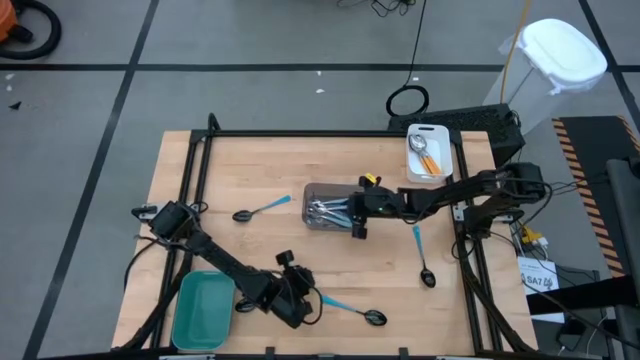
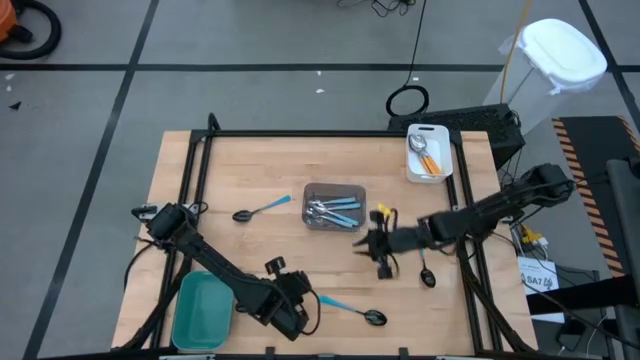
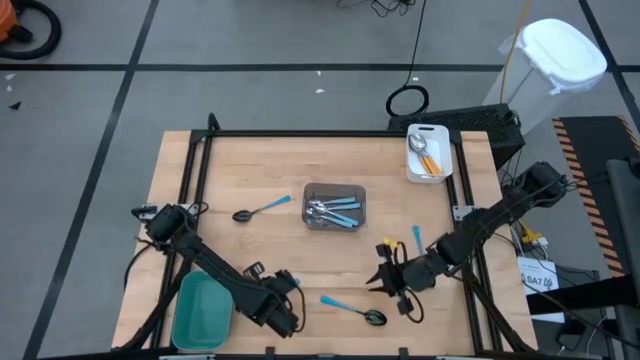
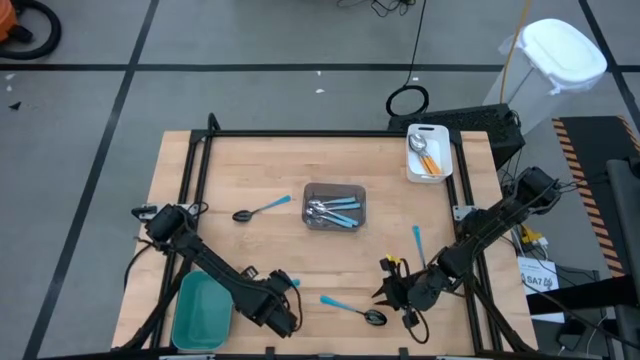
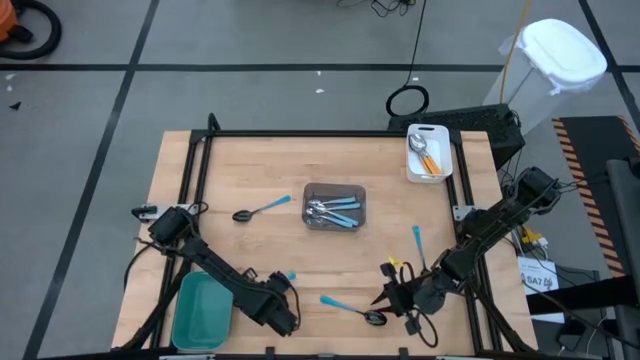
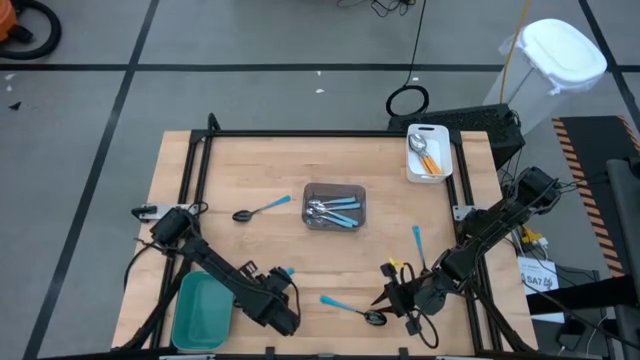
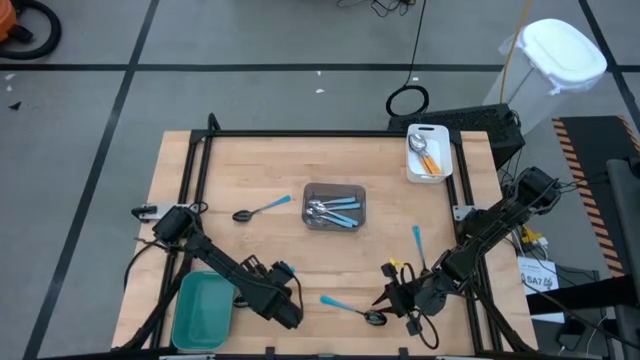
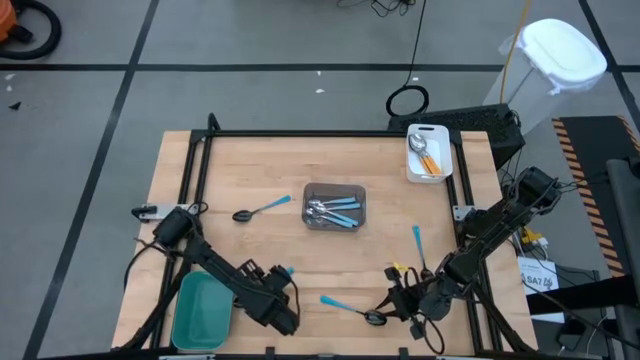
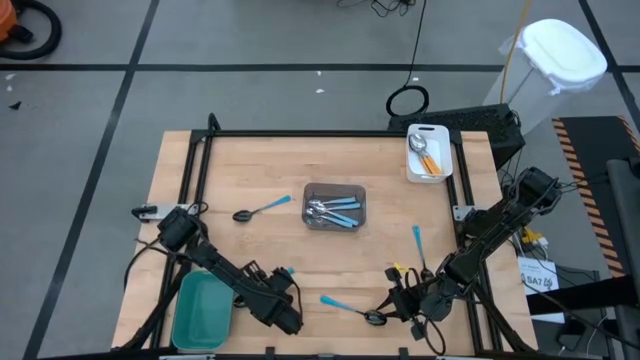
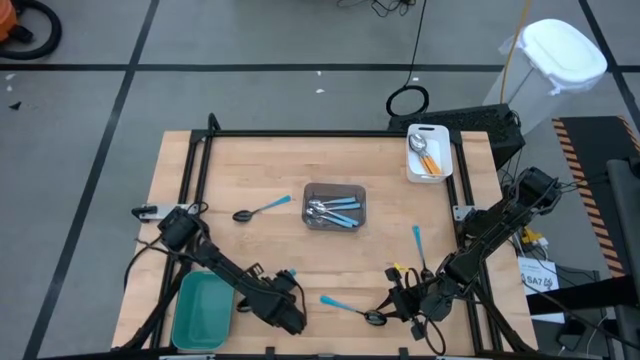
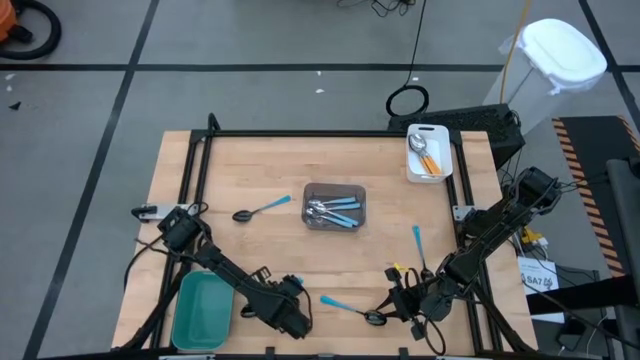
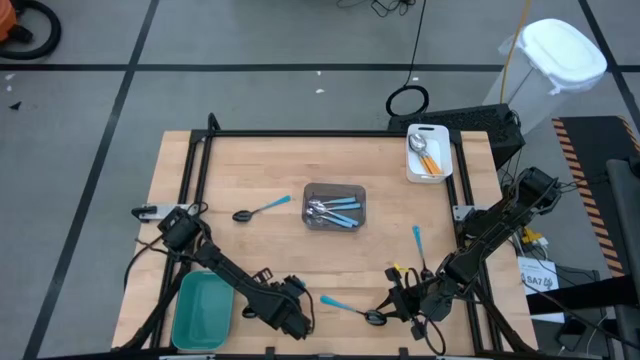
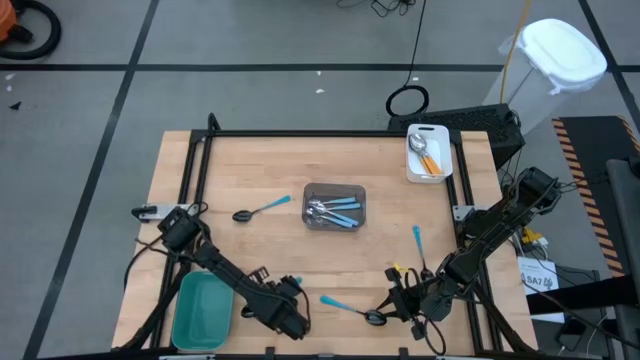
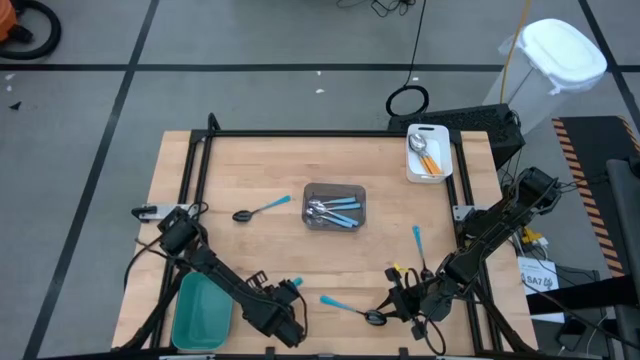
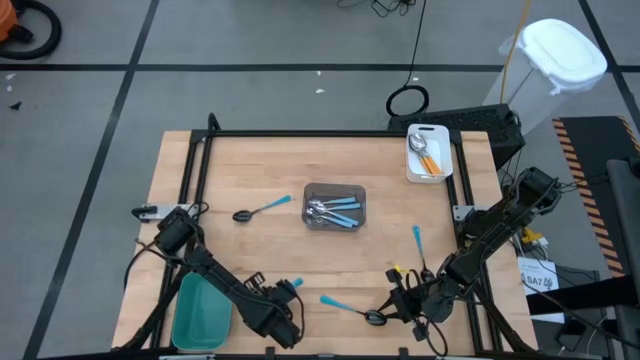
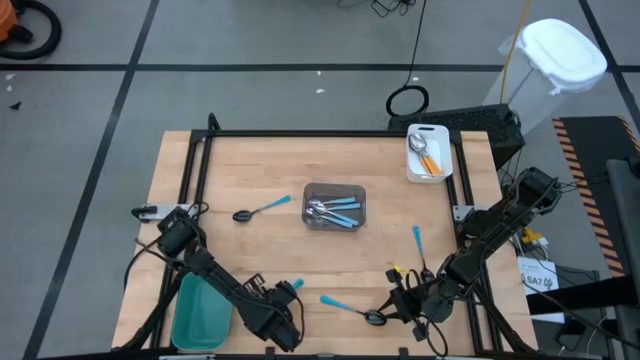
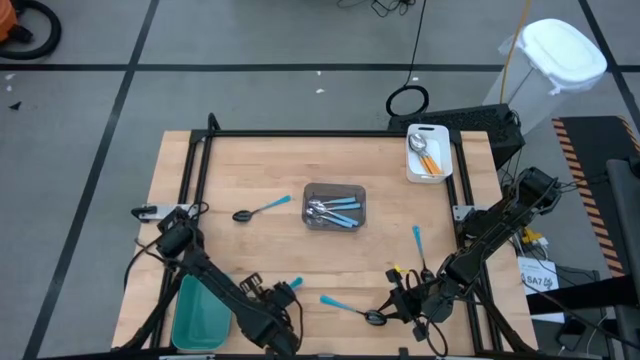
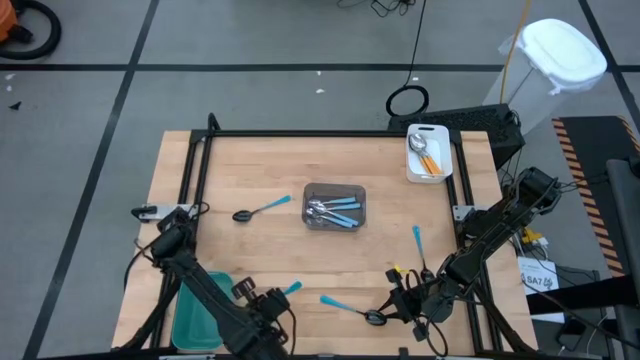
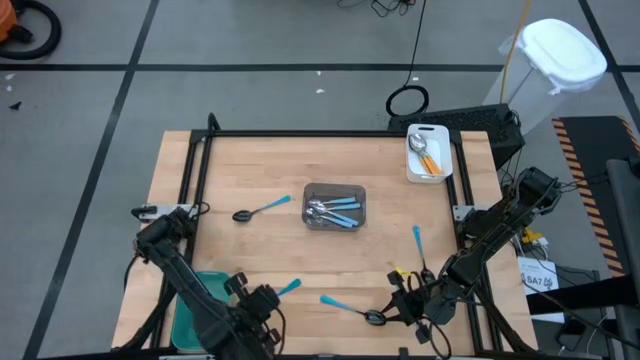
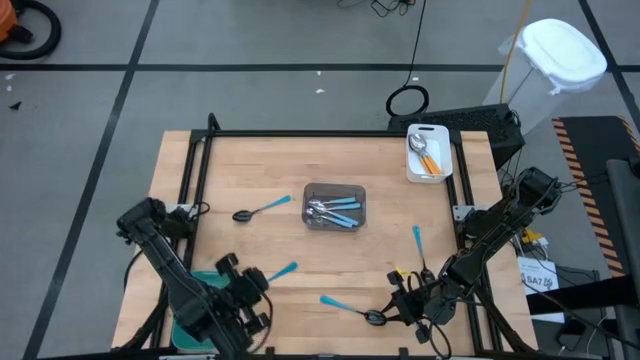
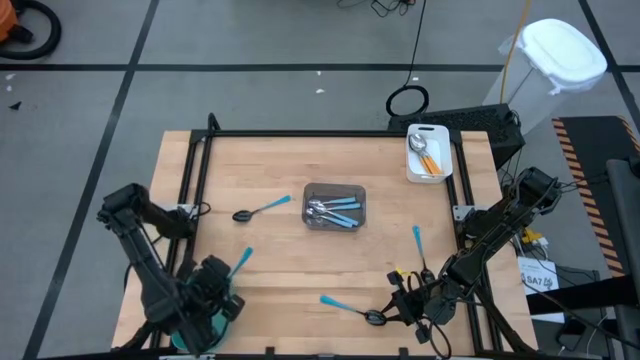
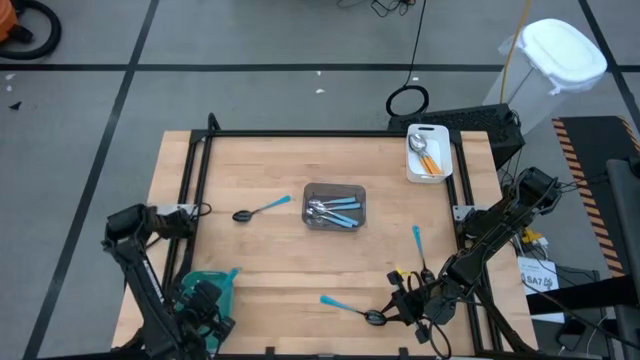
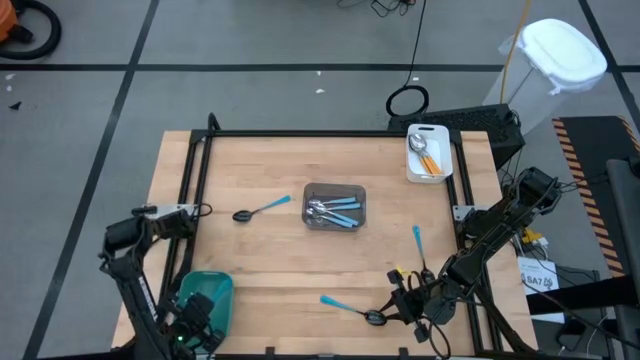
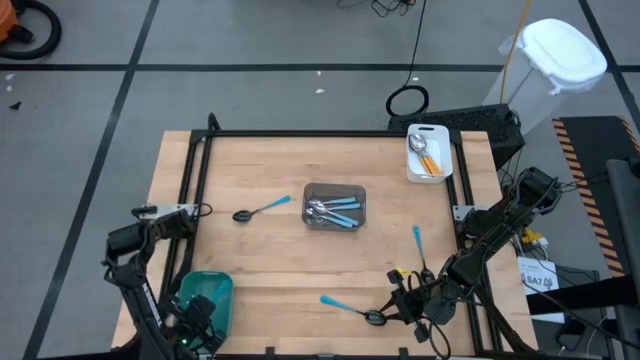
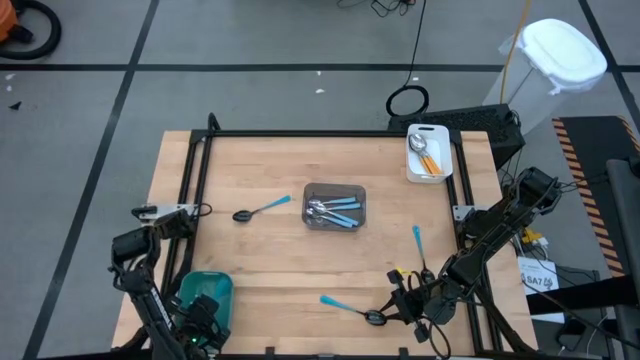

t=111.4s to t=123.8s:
Task: Sort silverware by color (type)
Put the bottom left dark blue spoon into the blue bin

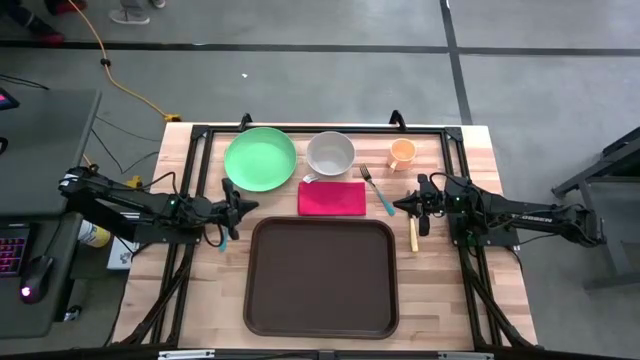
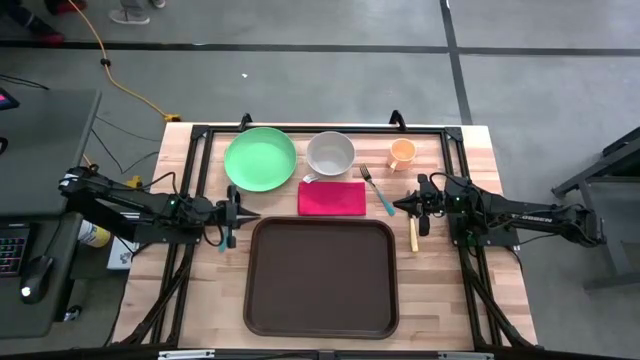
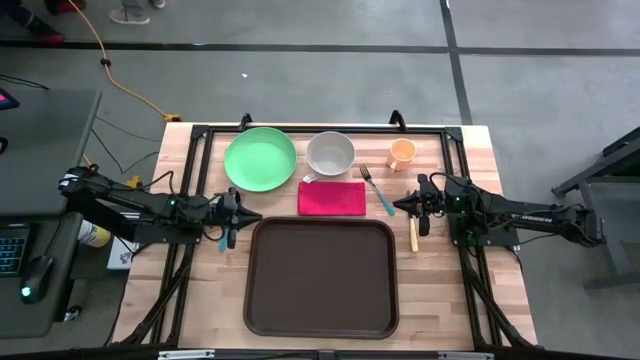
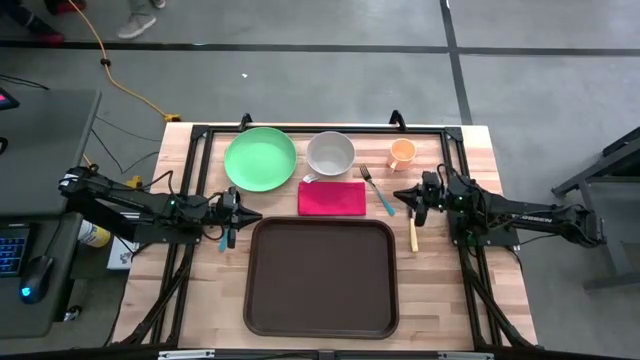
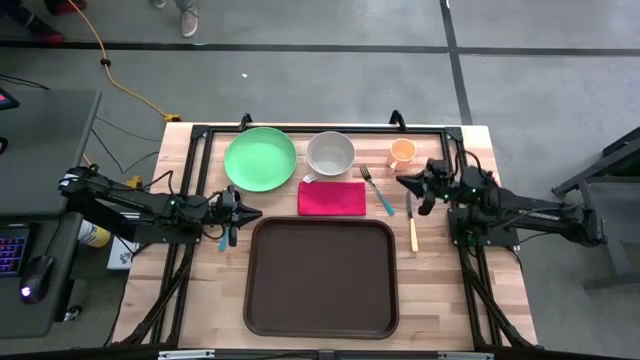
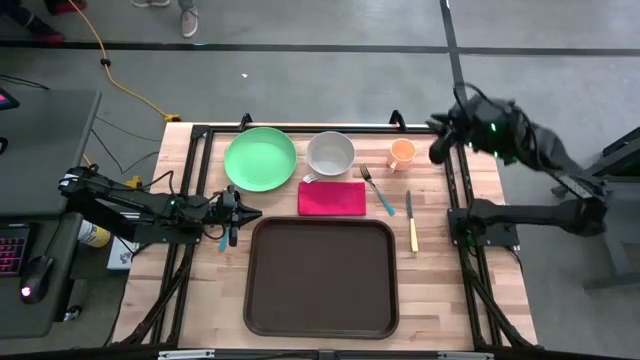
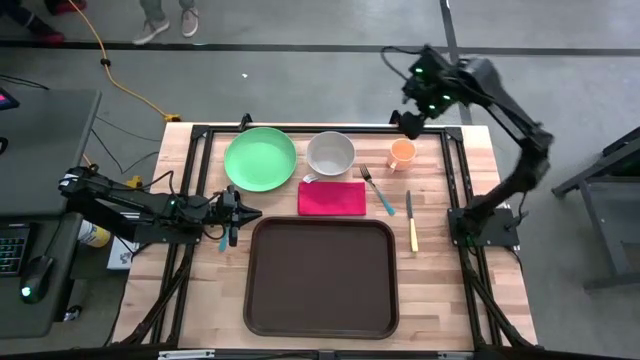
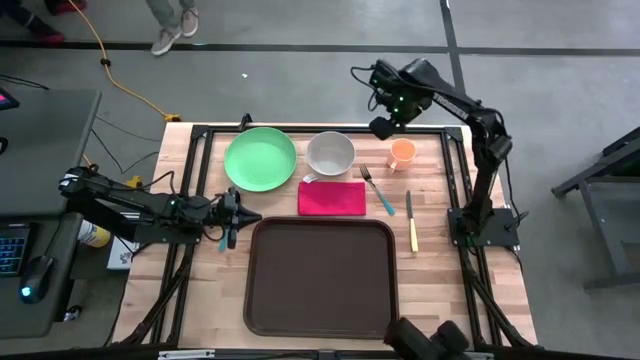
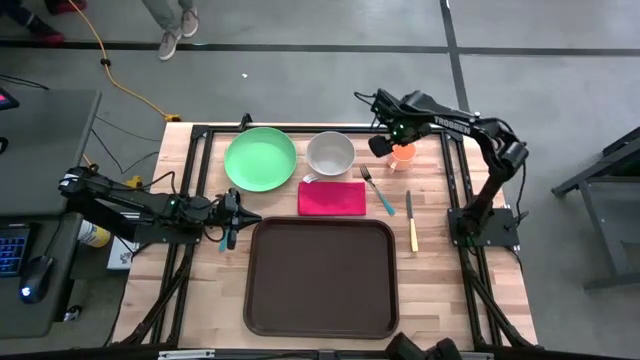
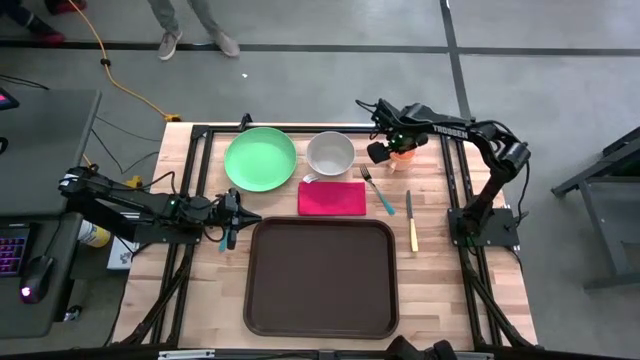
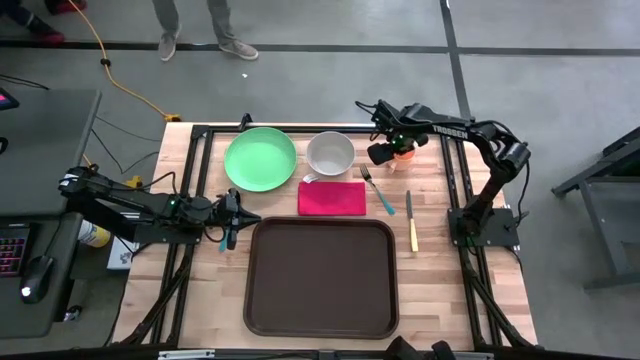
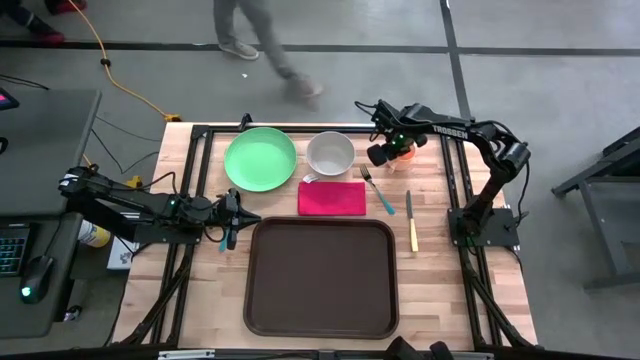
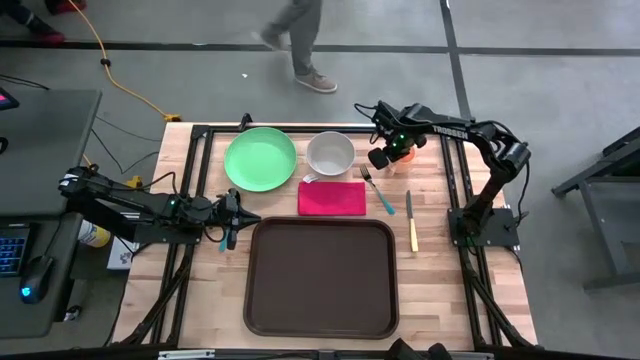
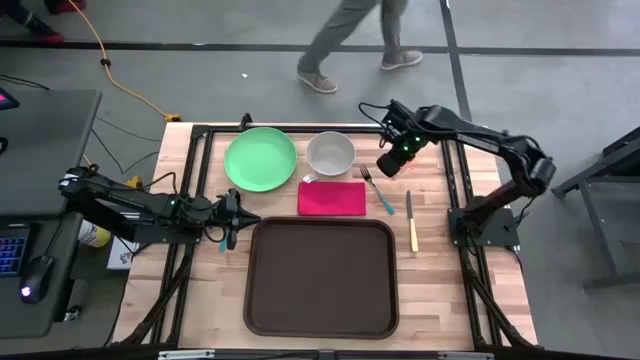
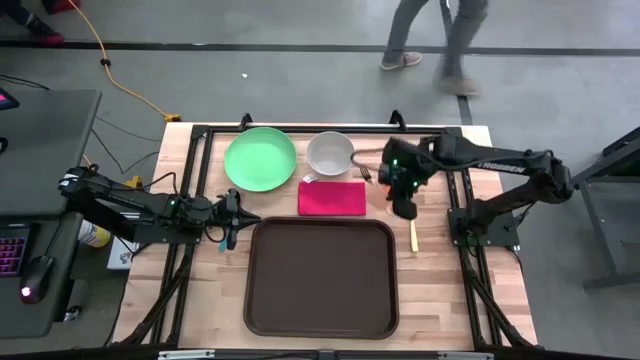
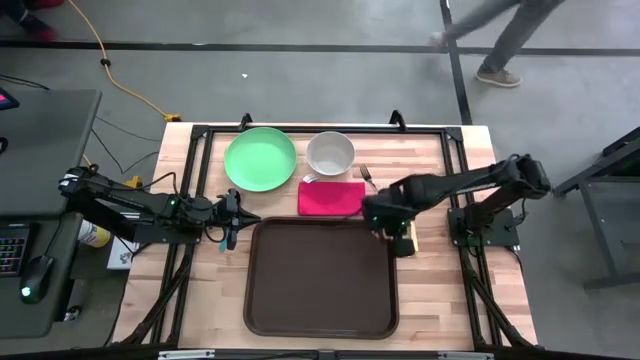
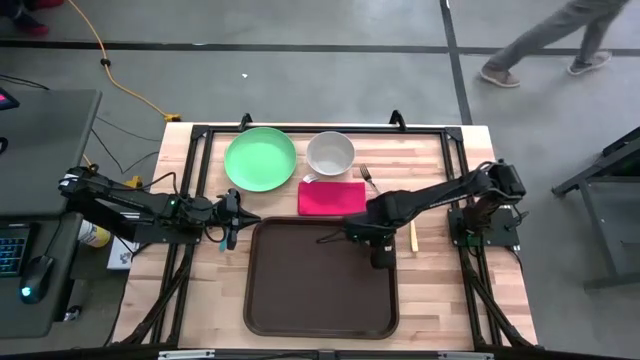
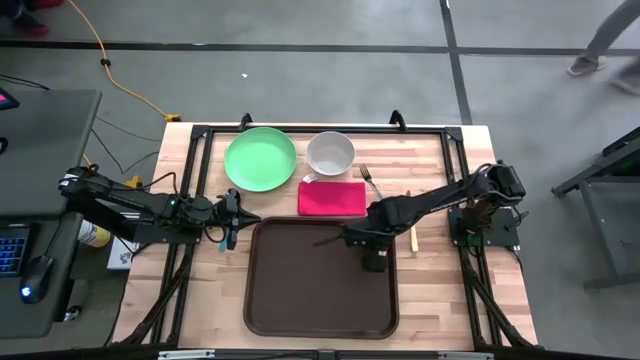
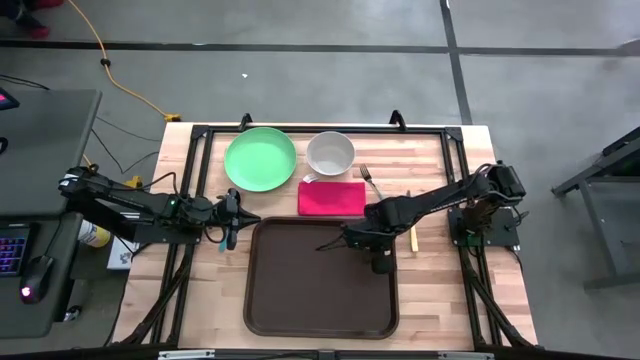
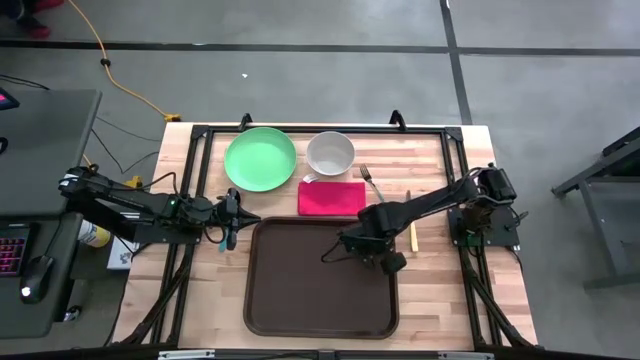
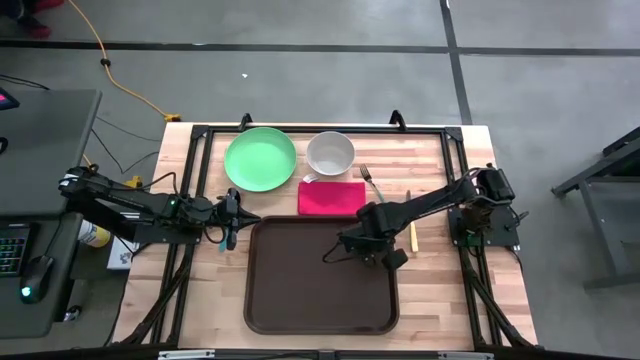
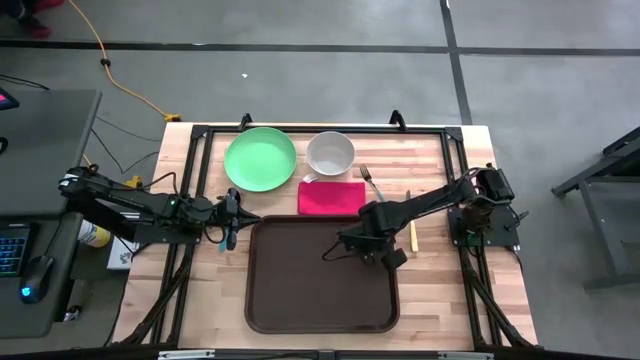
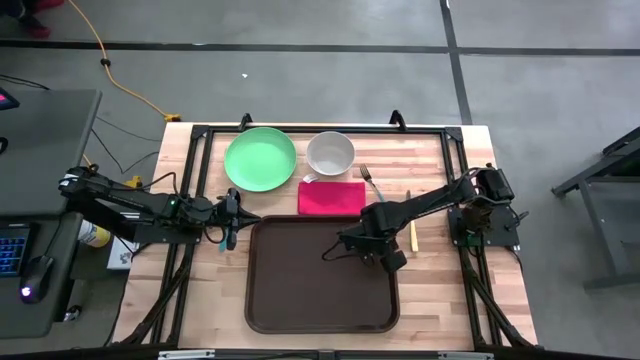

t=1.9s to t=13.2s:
Task: Set up tray
Put the orange mug on the brown serving tray
